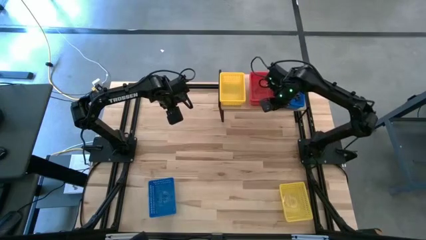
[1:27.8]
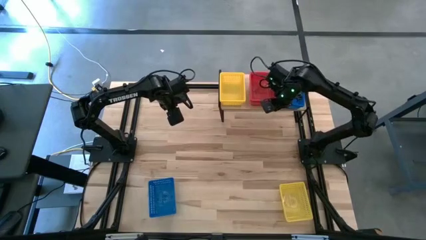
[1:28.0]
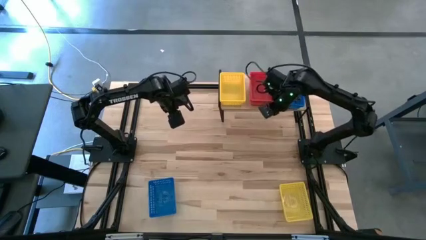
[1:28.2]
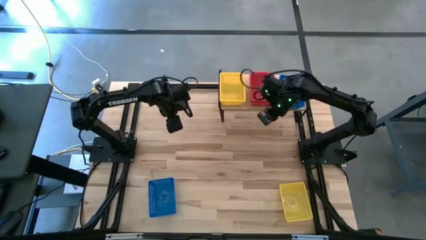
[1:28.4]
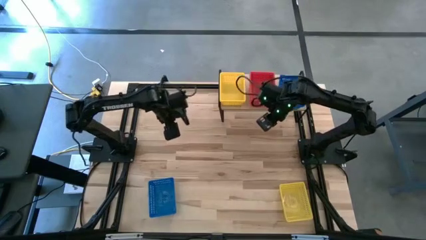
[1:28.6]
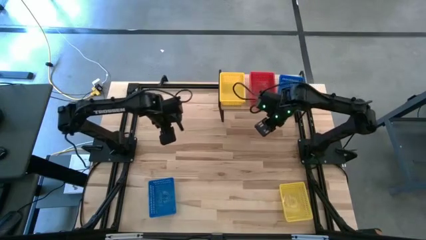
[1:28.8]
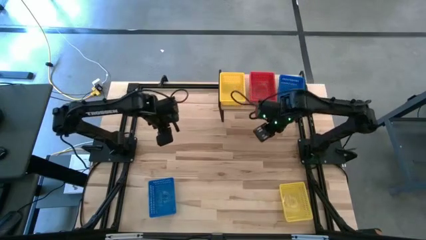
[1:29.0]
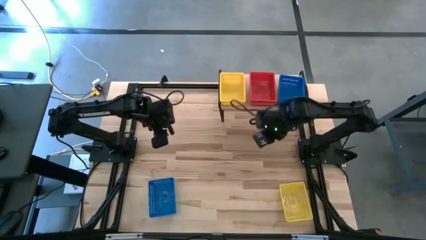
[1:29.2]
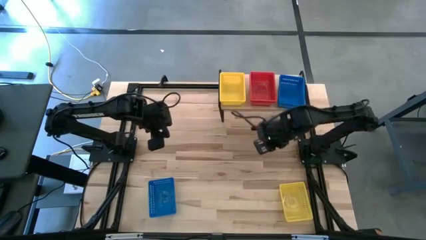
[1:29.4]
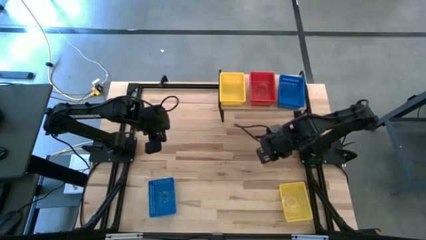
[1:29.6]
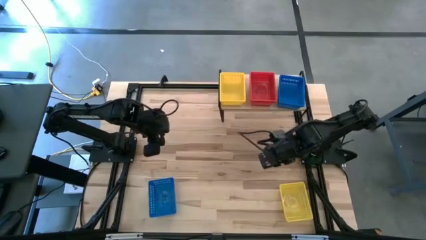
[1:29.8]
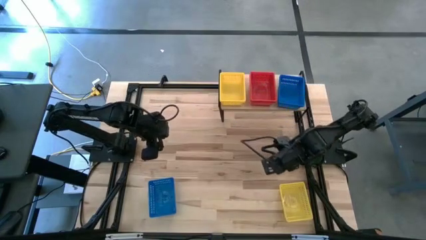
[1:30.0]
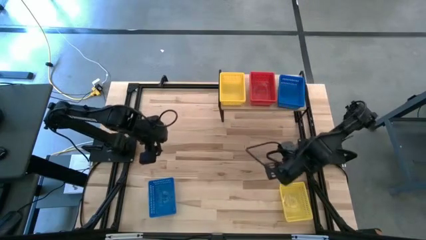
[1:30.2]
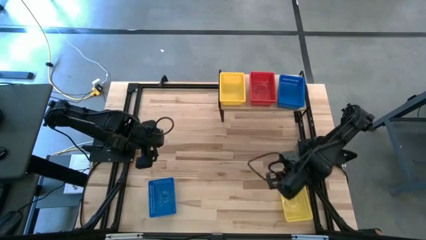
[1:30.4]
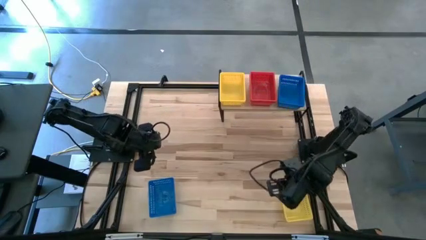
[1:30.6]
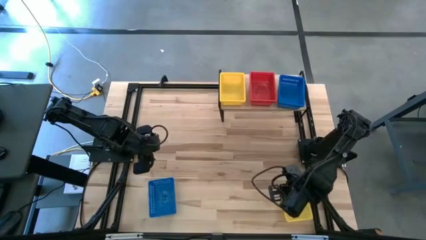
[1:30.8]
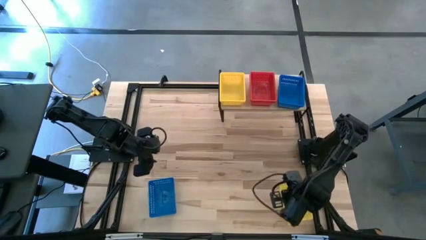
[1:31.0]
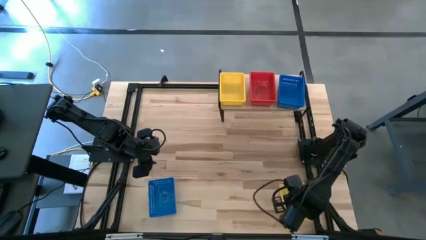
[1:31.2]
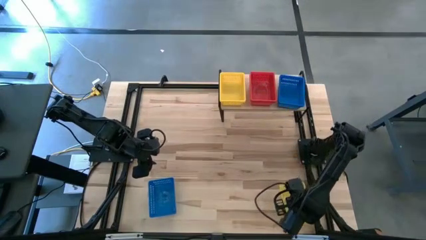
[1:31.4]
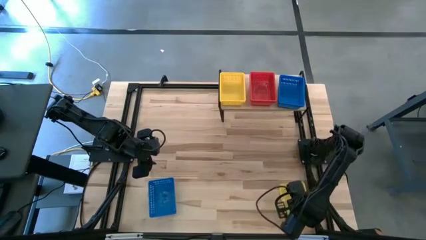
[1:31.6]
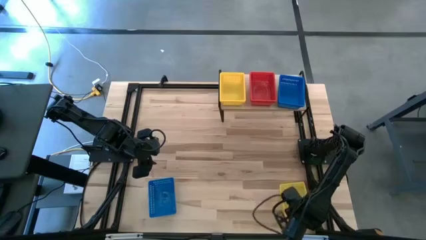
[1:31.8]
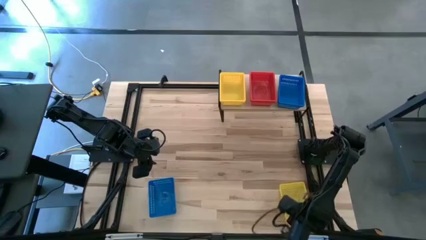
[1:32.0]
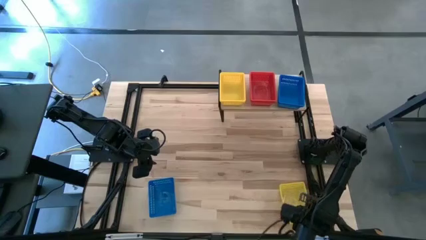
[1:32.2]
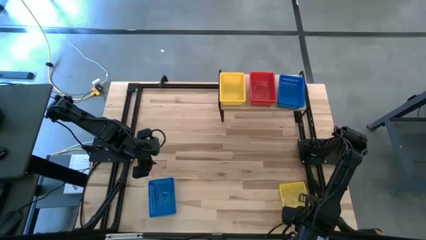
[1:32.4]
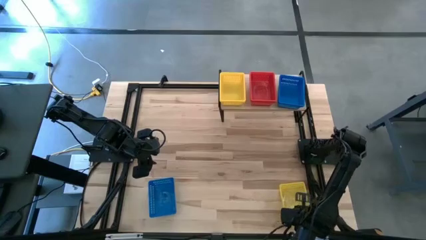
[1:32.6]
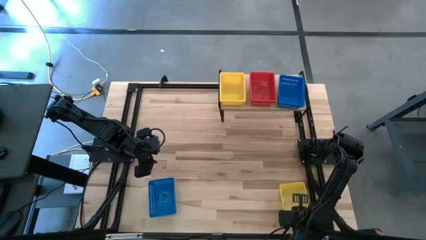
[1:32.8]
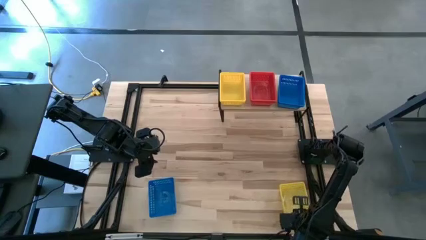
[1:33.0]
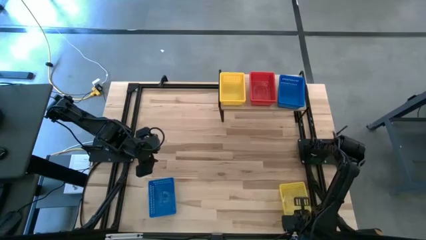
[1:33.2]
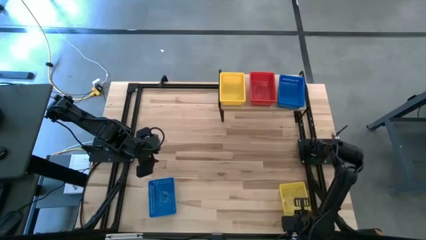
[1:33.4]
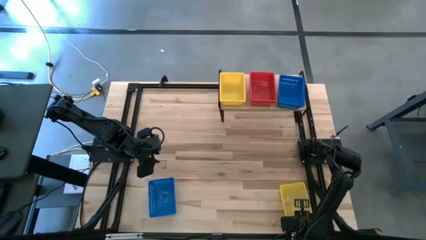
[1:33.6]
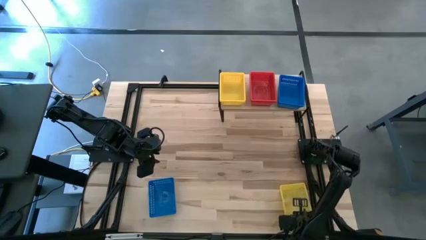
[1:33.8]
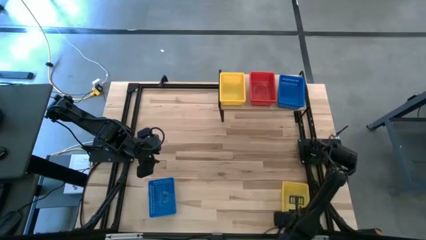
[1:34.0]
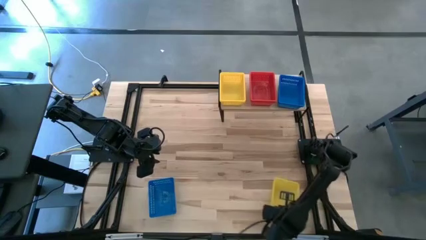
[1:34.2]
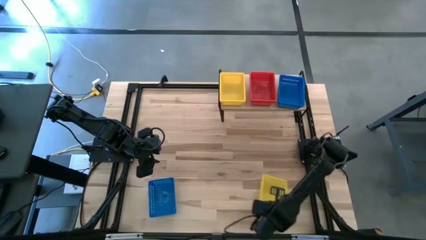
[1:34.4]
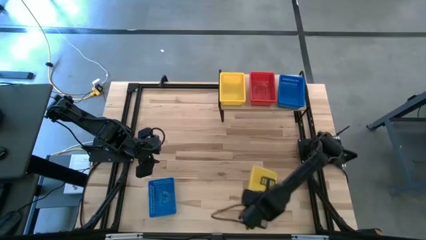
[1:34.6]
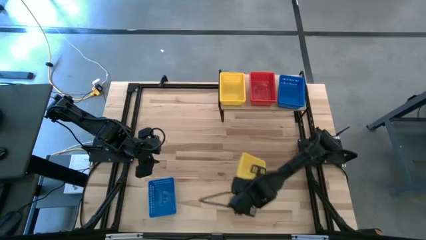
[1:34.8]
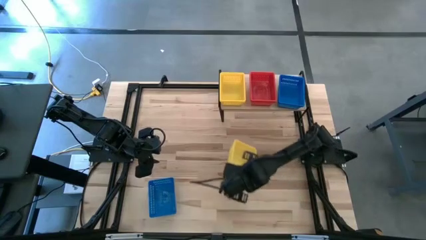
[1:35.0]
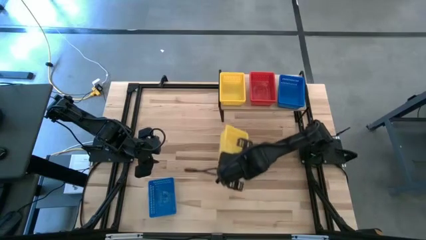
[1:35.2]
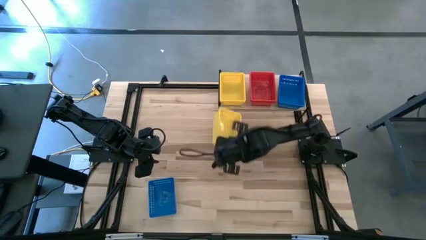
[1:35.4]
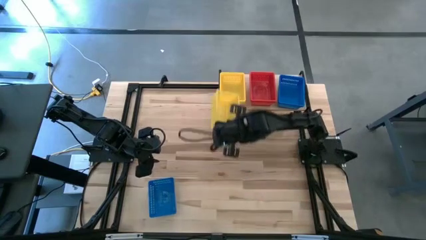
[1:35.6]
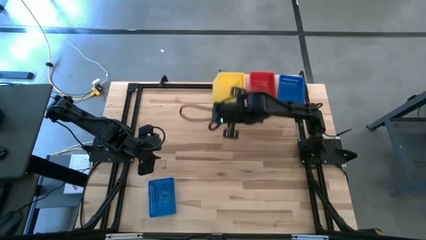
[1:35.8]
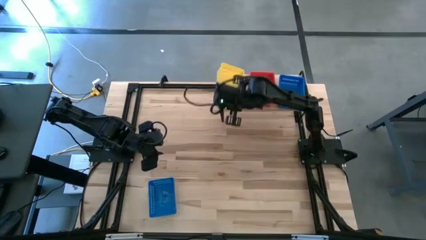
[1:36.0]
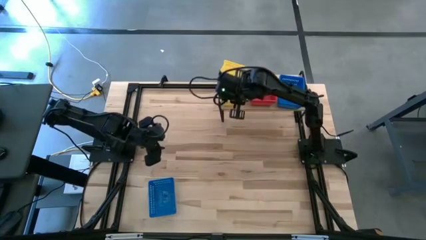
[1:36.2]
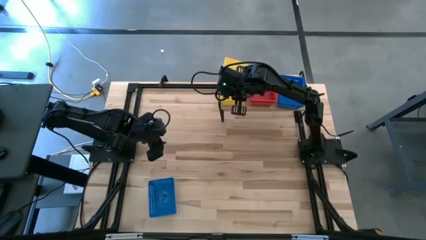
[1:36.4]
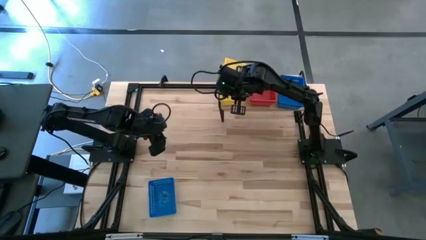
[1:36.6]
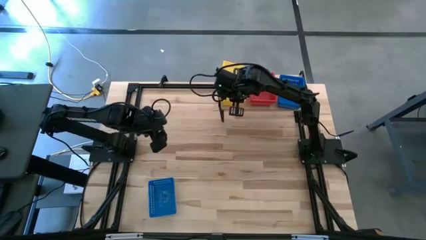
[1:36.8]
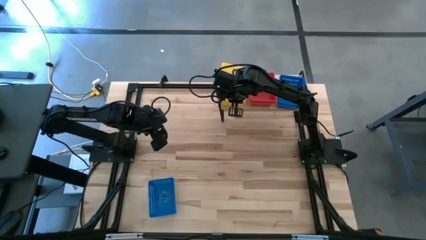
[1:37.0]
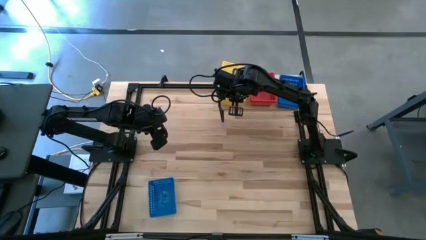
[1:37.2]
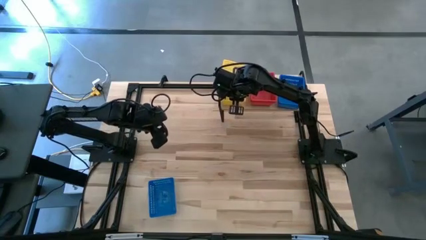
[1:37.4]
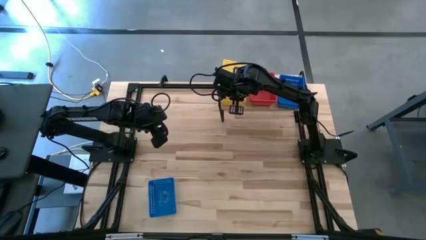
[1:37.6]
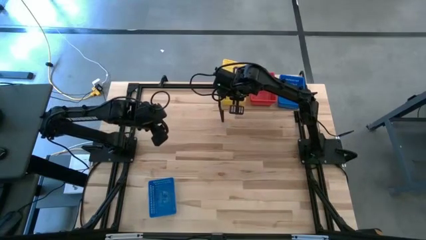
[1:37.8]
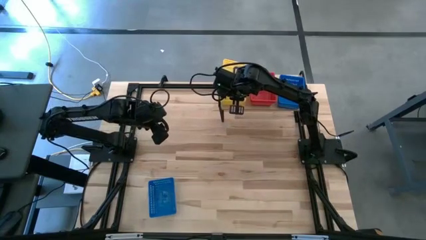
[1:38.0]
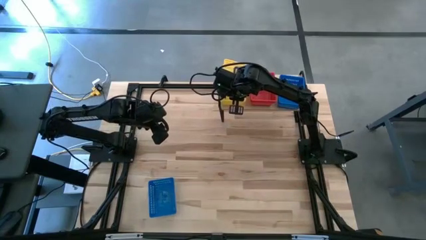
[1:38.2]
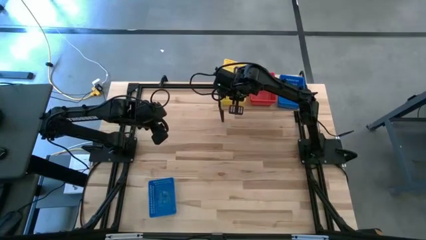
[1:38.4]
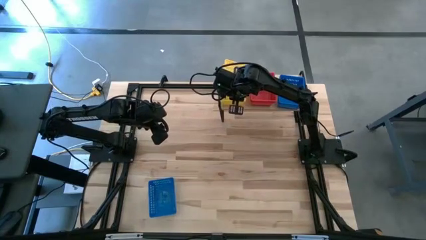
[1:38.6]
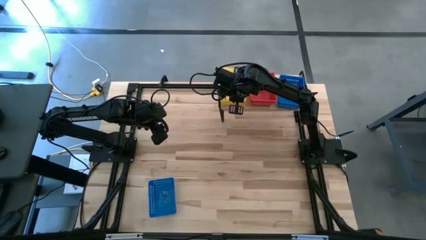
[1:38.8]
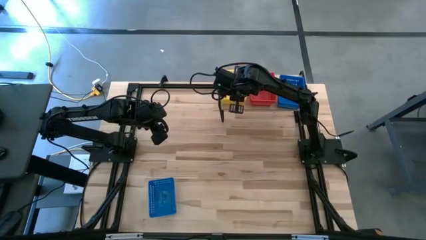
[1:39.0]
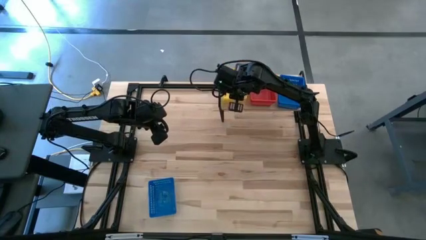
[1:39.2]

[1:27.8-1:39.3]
Task: Stack baskets on shelf by color
Stack the yellow basket on the stacked yellow baskets on the shelf

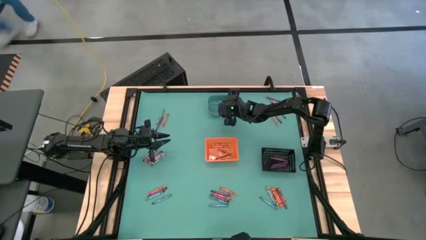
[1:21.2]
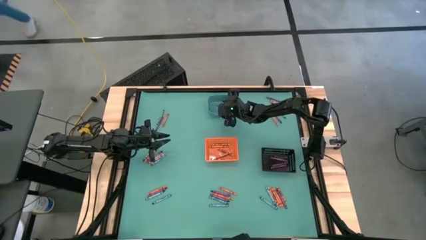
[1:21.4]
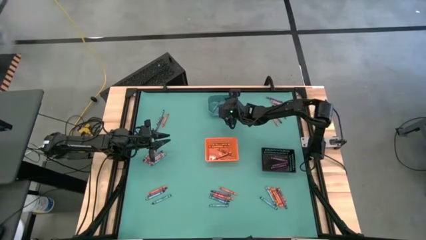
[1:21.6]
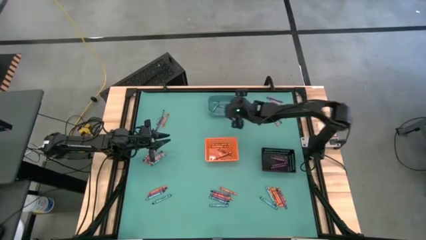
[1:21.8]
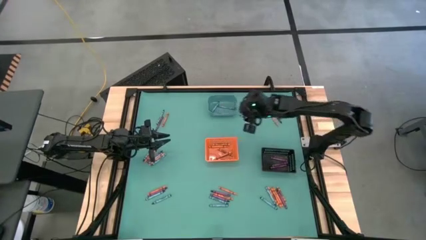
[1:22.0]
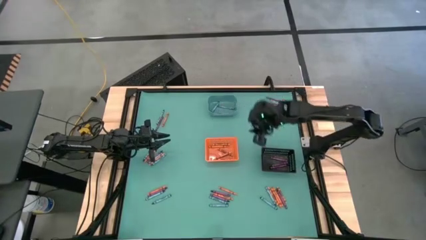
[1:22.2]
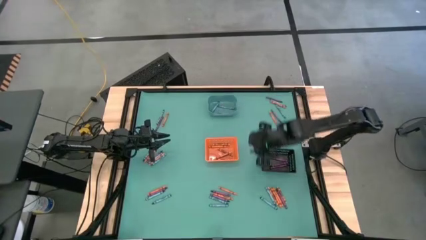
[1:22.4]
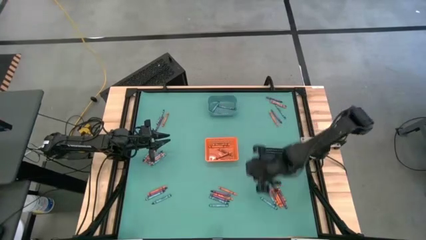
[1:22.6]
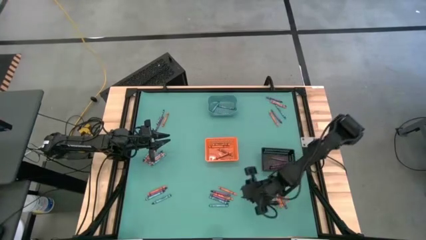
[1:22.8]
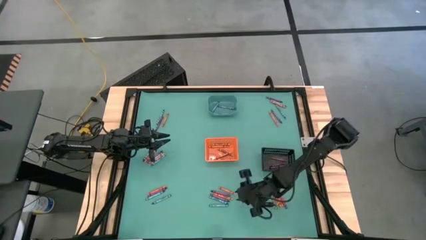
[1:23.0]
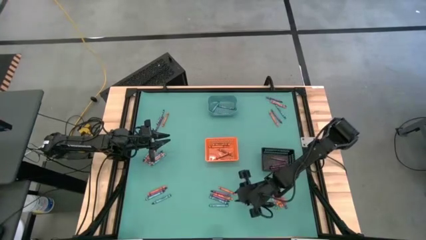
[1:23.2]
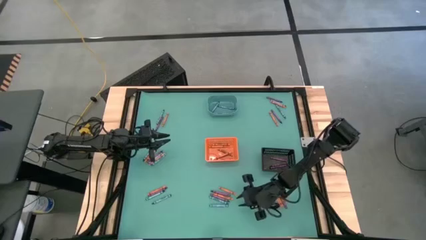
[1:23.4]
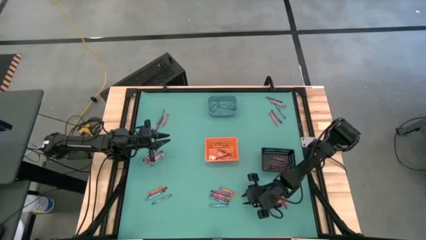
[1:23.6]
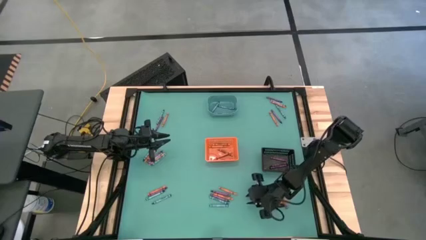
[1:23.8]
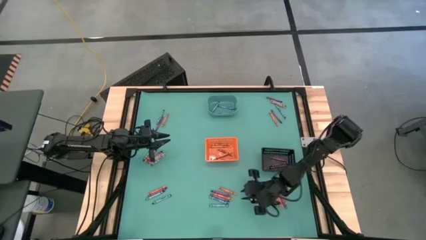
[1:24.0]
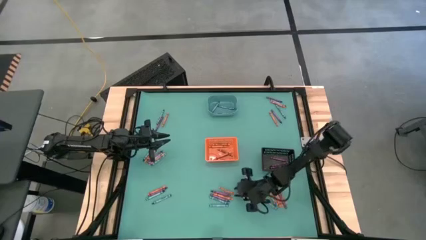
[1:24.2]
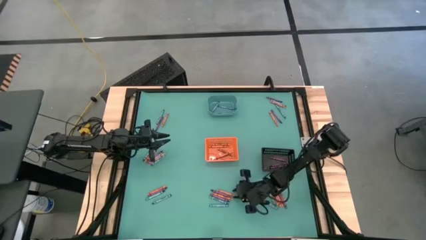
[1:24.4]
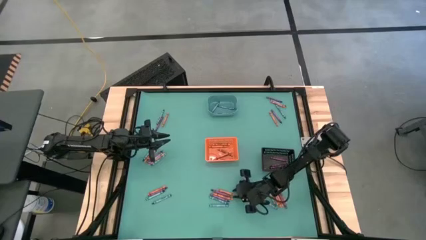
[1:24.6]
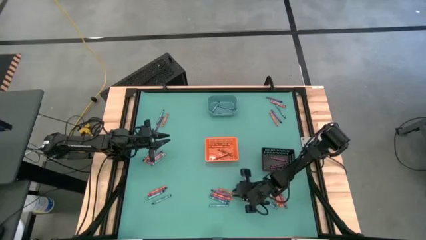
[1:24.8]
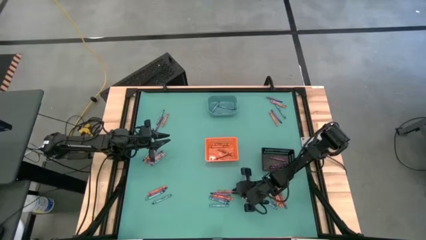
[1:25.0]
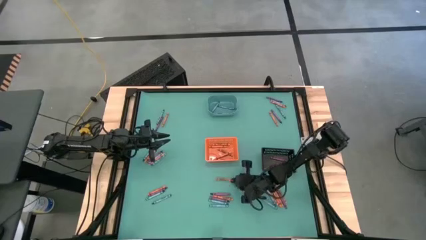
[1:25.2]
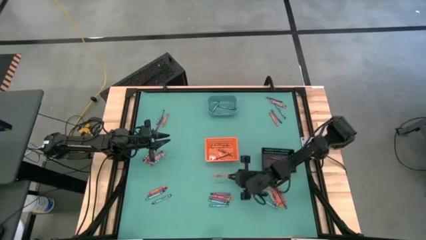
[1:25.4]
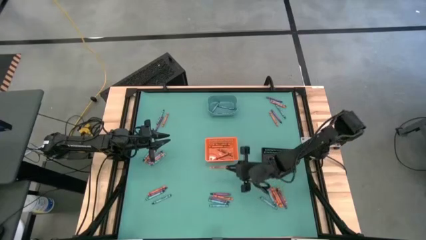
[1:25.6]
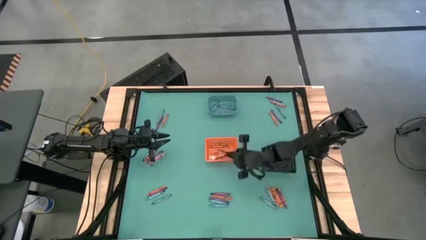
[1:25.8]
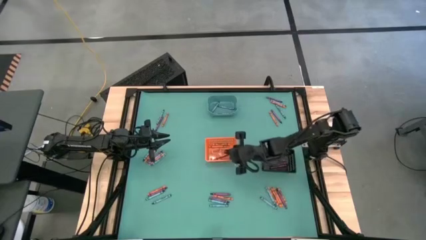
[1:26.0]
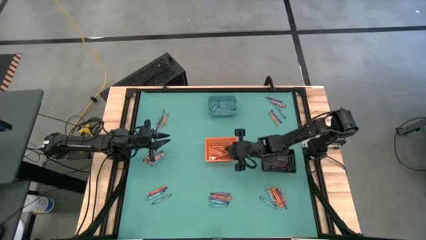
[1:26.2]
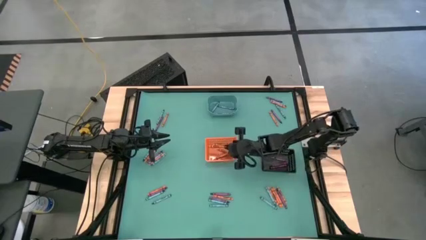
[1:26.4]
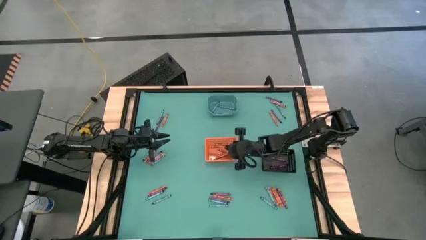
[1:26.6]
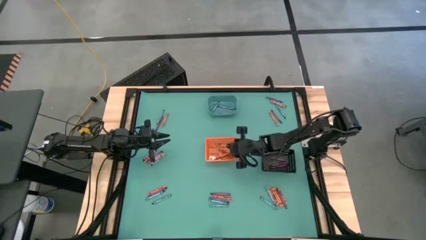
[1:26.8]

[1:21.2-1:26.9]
Task: Sort crayons
Put the orange crayon into the orange bin
